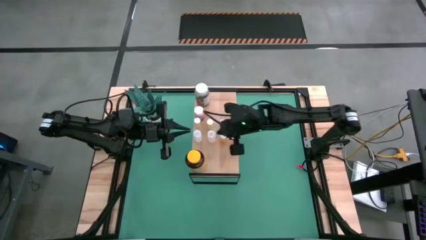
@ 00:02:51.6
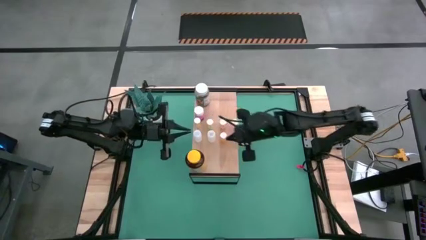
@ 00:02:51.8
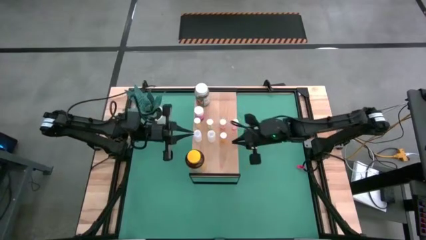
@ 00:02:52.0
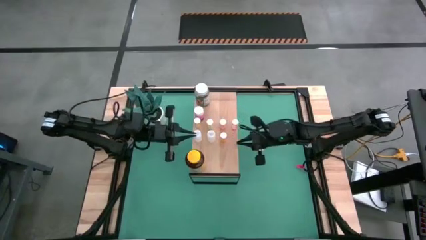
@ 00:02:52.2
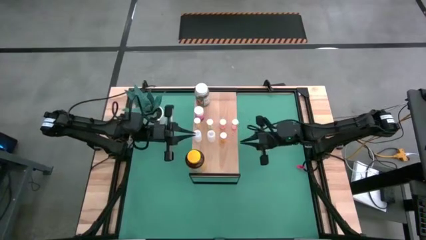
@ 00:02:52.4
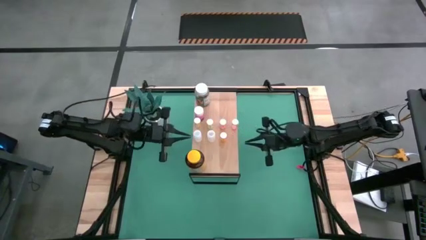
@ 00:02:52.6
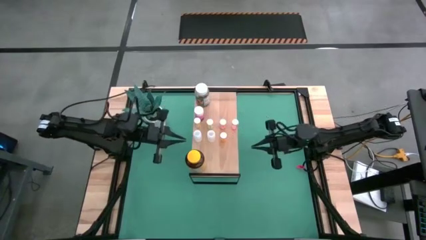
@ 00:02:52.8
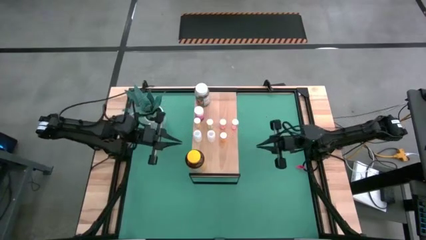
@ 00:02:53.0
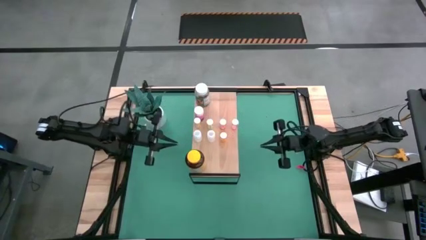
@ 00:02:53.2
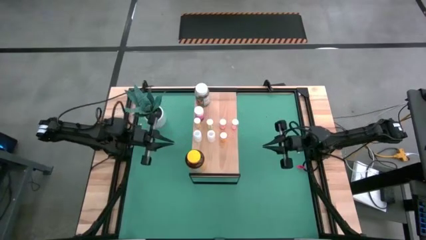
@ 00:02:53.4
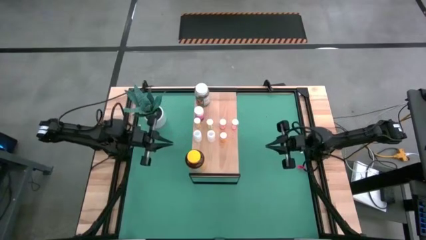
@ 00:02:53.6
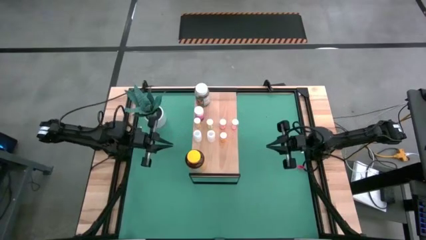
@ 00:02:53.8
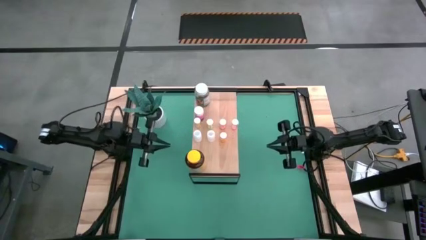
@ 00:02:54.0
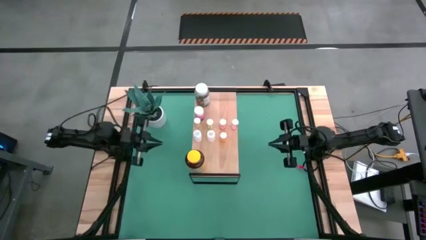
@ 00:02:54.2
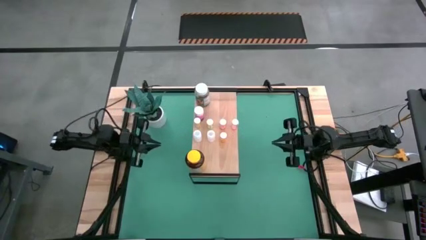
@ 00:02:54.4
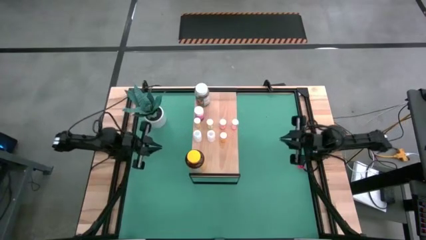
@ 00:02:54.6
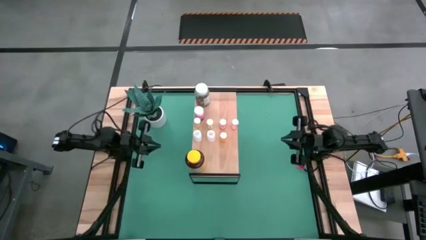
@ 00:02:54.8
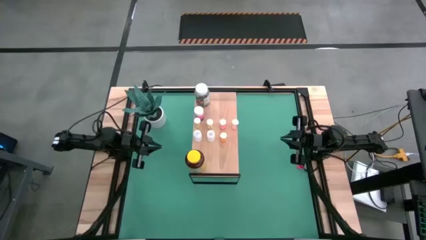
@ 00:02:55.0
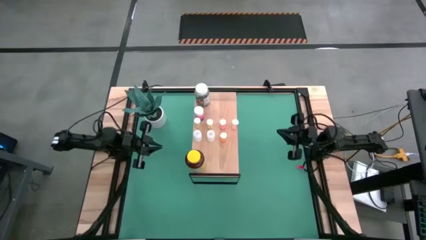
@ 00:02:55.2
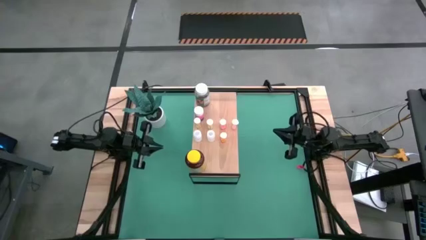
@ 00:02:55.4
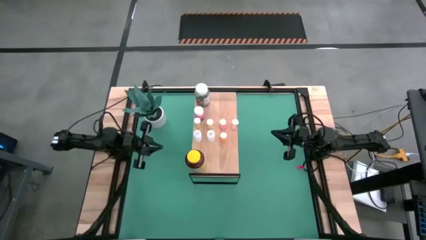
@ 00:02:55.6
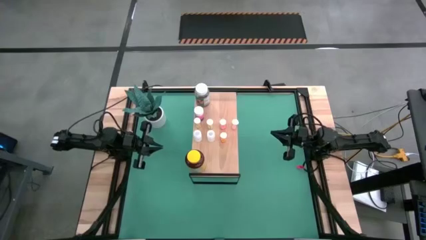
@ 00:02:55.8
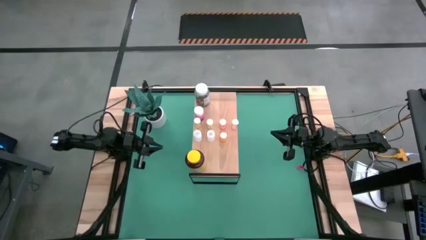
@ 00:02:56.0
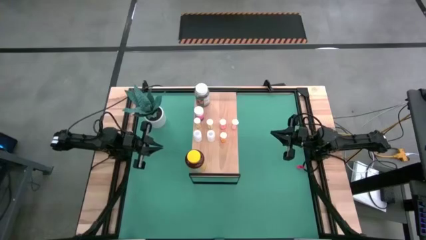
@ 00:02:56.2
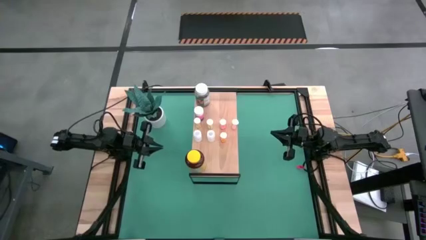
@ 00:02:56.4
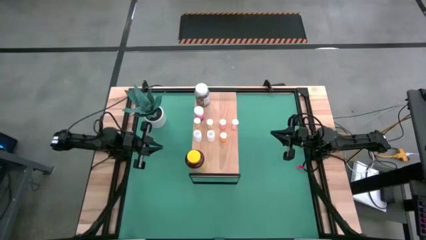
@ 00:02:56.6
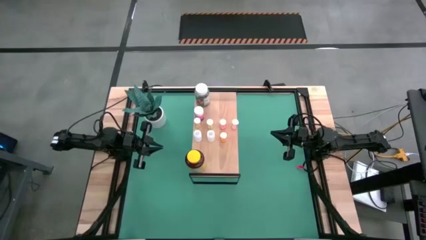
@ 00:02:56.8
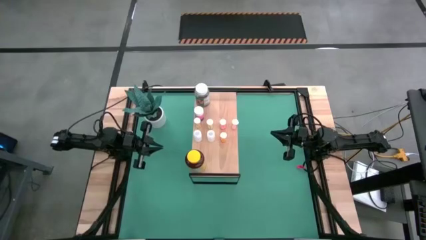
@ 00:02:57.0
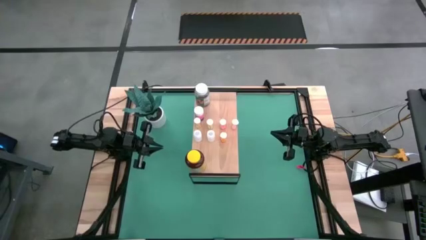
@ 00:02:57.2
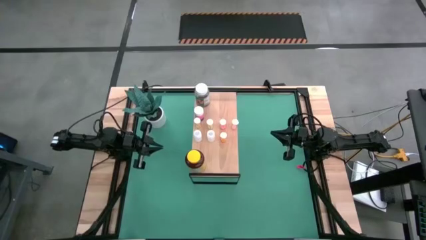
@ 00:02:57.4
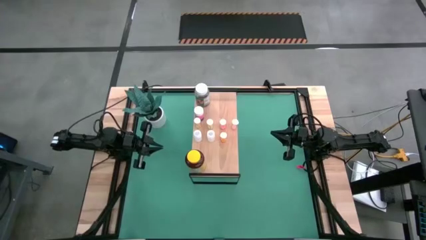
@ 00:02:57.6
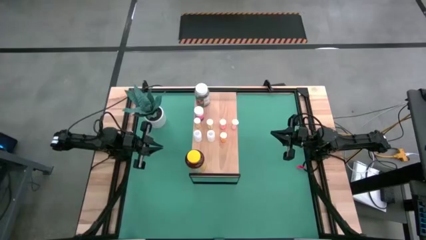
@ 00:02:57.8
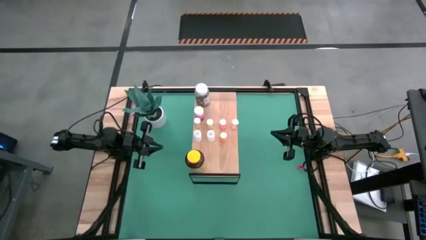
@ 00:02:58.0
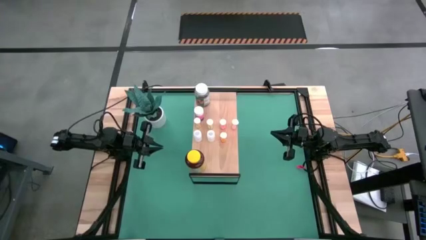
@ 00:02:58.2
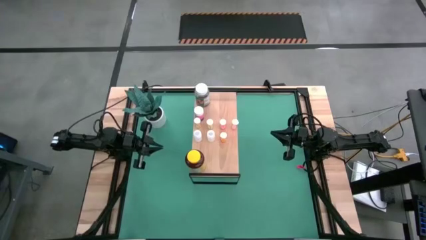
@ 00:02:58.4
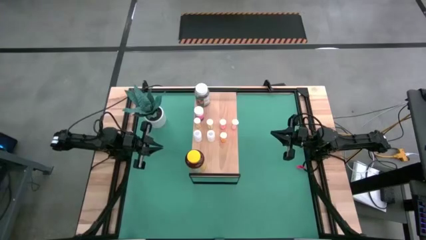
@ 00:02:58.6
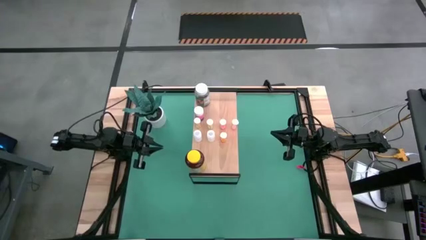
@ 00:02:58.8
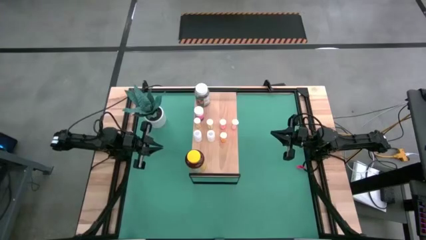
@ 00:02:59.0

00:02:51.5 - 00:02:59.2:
Task: Pick and place medicine bottles onto shelf by color
Return to home position

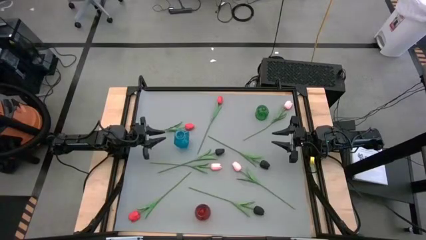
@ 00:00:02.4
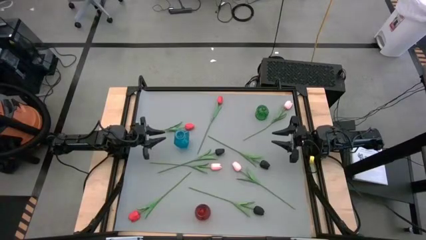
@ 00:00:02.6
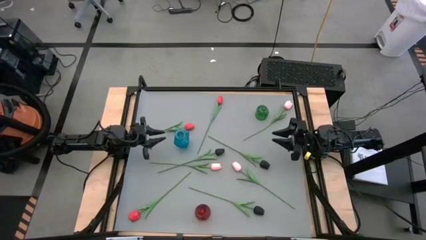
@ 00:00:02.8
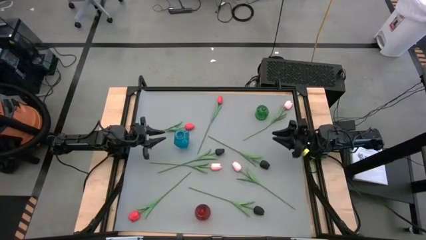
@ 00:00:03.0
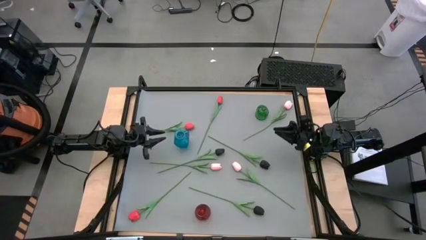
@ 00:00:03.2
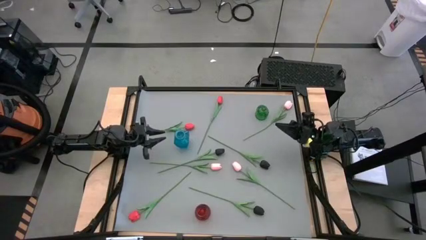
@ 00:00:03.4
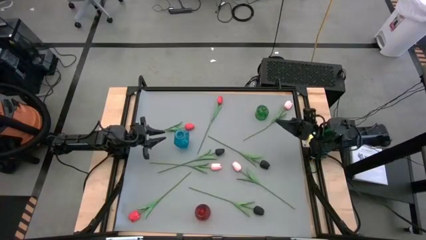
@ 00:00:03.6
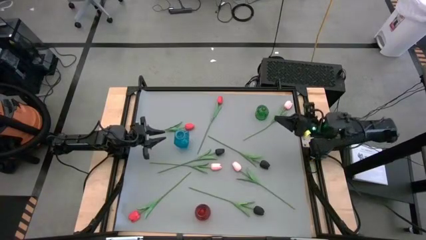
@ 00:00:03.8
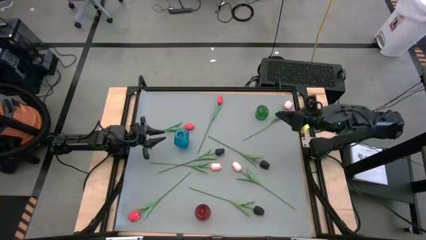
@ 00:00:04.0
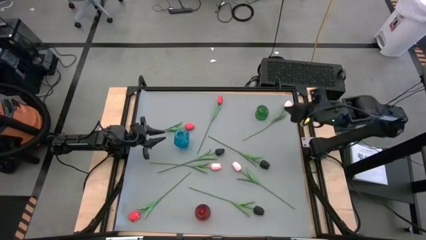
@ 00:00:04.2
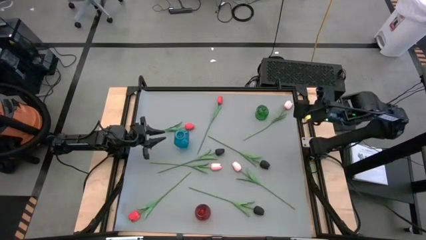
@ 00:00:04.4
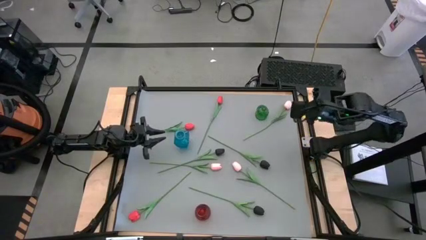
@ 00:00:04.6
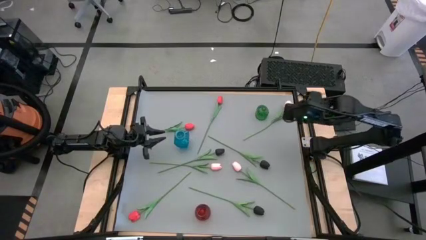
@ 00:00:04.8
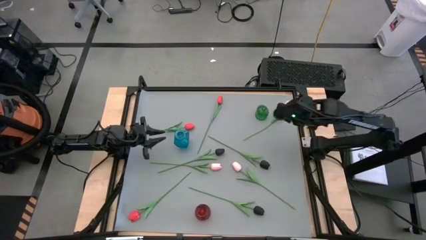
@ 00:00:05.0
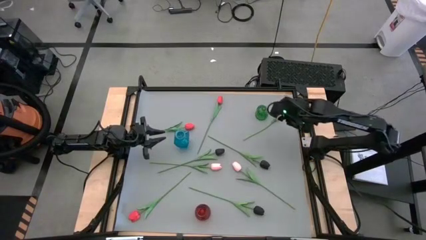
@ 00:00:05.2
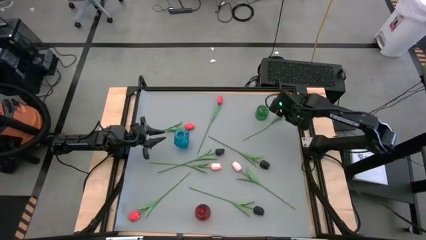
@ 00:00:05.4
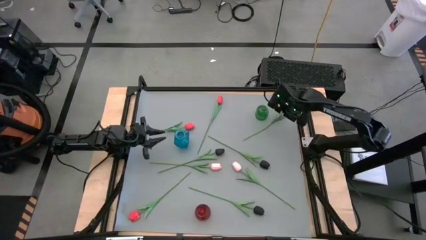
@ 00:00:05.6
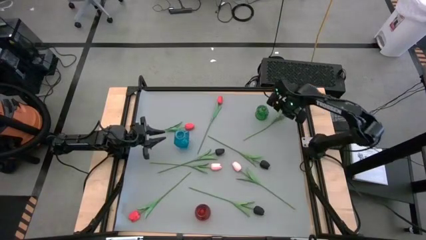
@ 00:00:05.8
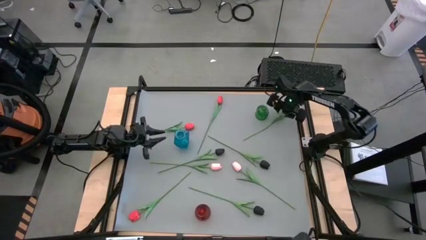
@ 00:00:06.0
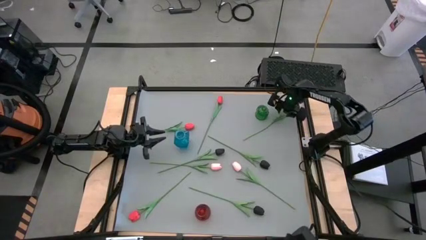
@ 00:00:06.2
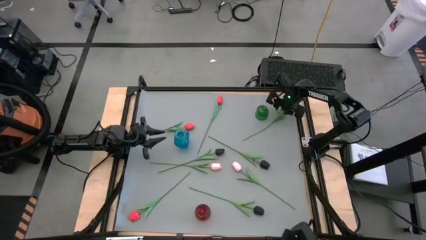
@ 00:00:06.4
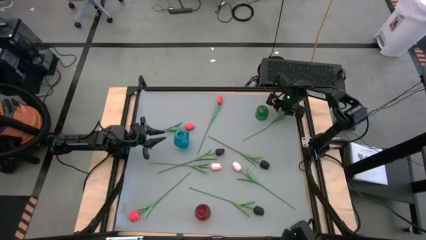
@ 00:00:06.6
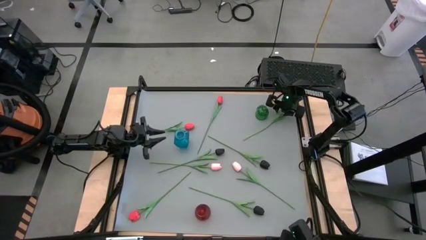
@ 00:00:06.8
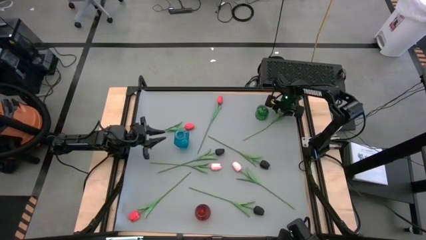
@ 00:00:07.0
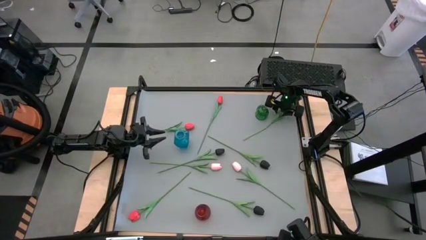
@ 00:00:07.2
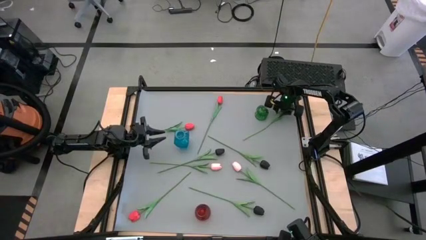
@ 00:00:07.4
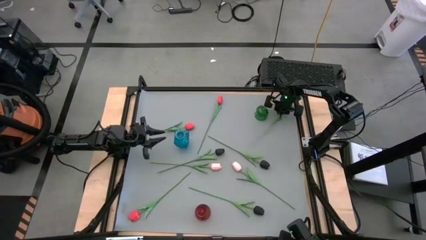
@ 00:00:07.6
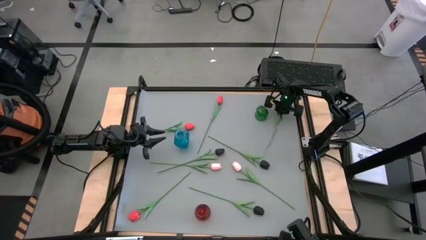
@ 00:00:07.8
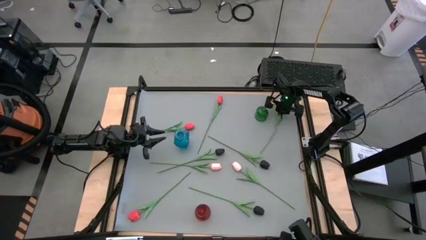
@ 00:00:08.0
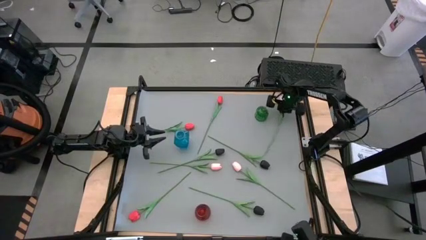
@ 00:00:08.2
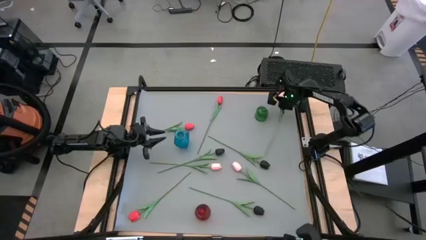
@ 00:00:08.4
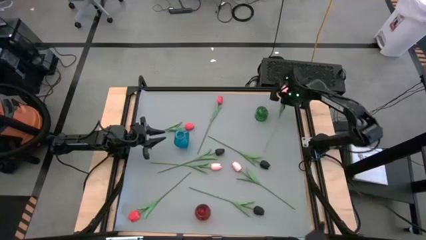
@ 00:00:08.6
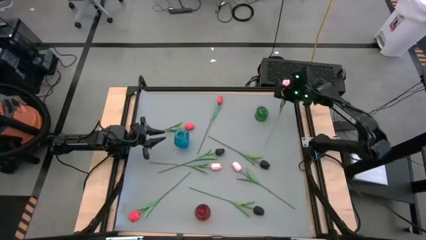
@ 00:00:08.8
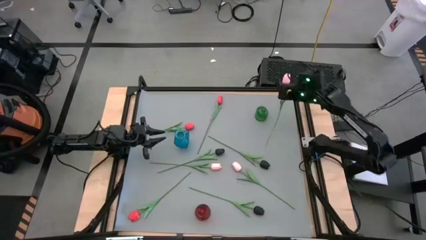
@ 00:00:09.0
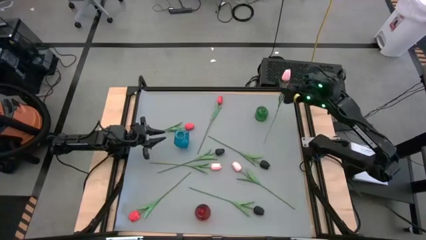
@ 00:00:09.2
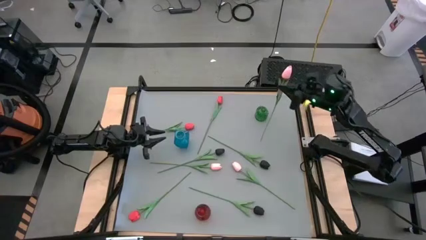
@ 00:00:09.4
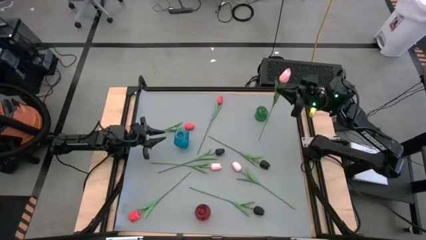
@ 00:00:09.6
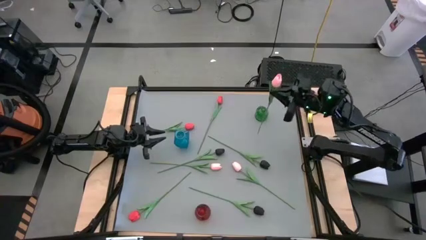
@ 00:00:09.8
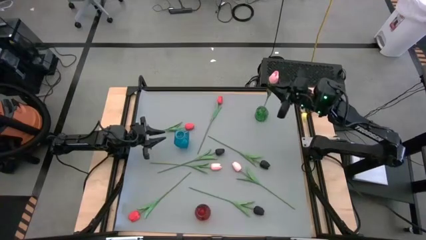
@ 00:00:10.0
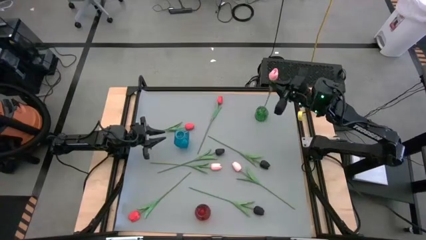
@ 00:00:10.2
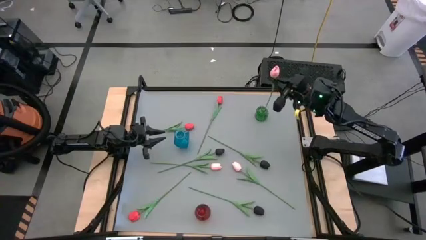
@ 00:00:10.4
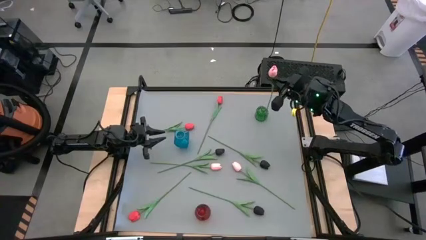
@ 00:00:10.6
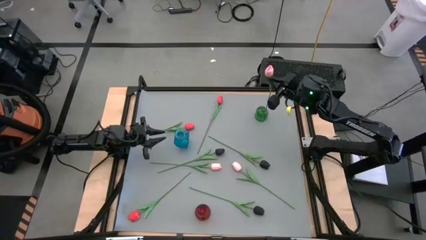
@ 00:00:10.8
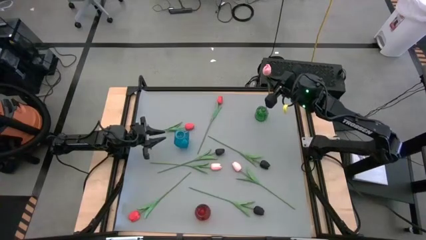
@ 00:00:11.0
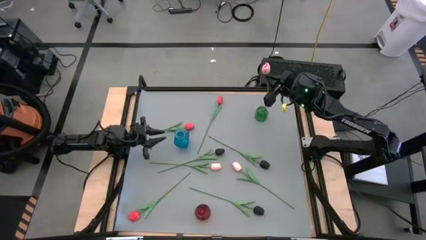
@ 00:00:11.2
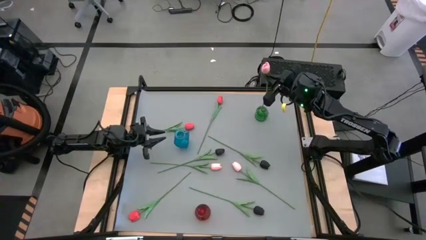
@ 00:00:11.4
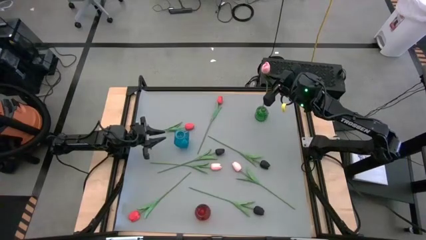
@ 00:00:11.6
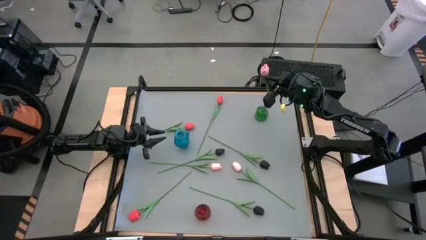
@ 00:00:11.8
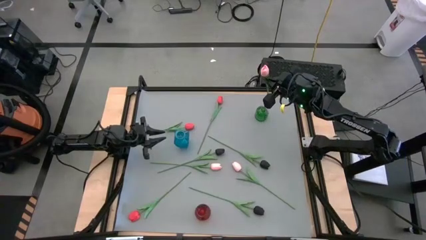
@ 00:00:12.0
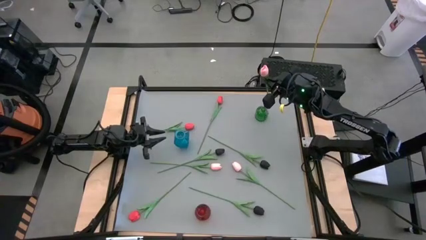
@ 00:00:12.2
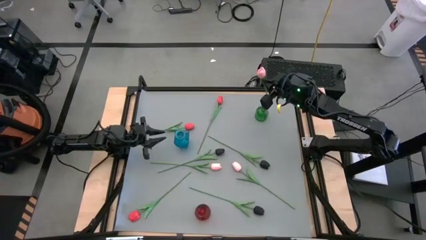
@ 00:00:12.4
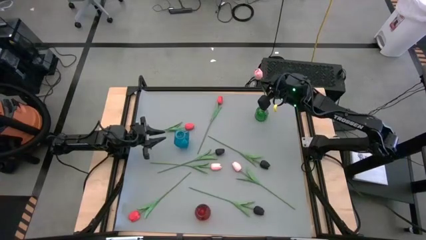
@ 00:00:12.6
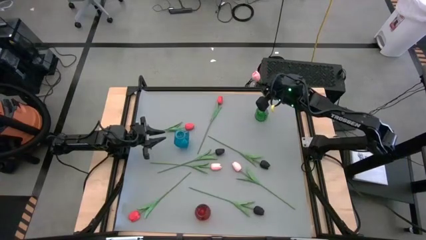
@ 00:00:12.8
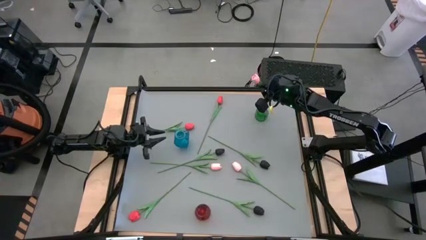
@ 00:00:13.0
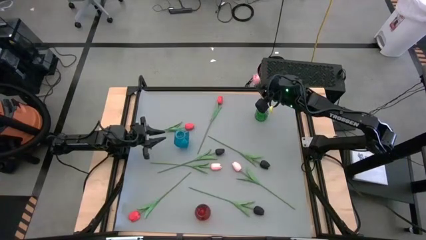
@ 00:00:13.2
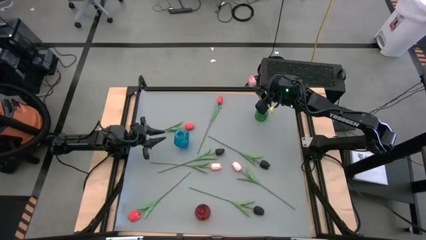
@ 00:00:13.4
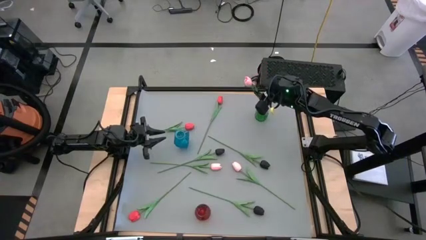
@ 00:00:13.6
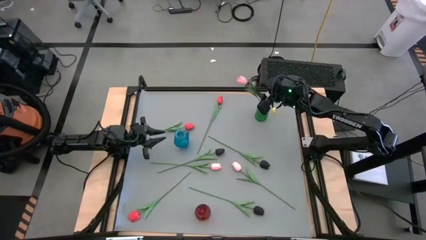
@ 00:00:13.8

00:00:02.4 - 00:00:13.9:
Task: Sort flowers into vase by color
Put the top right pink flower into the green vase
